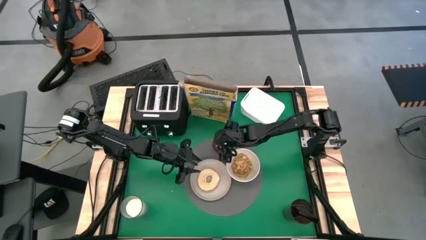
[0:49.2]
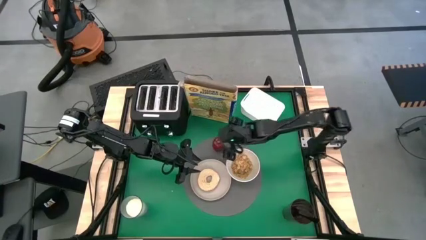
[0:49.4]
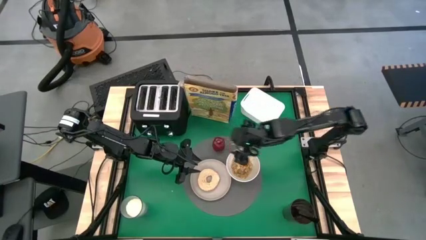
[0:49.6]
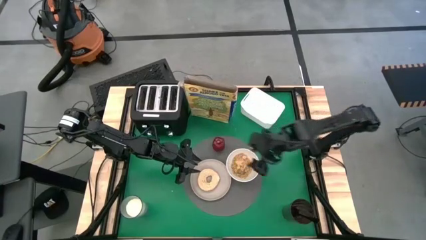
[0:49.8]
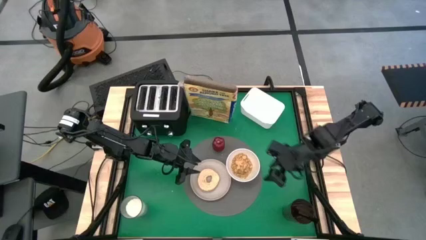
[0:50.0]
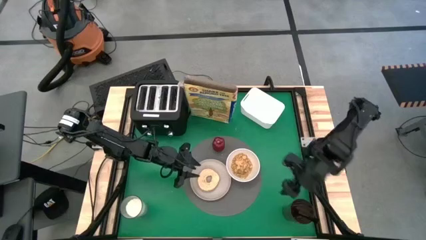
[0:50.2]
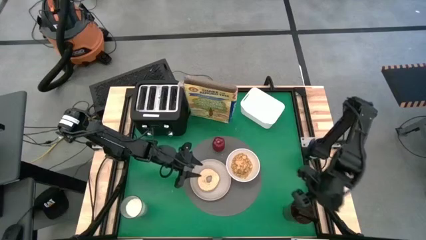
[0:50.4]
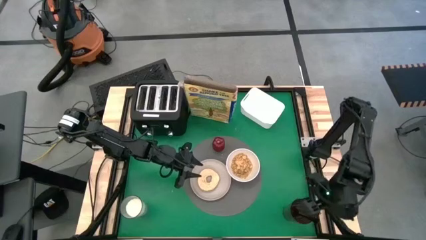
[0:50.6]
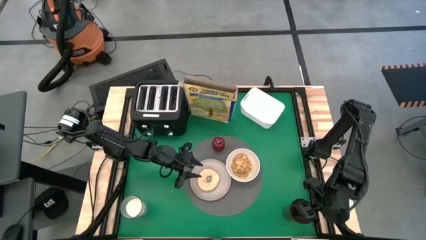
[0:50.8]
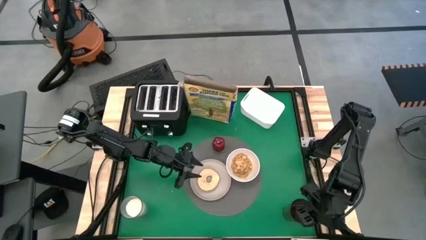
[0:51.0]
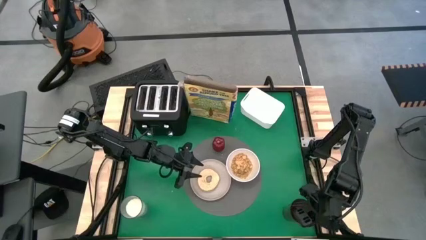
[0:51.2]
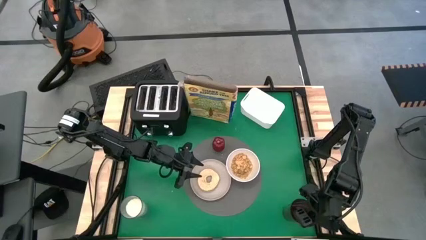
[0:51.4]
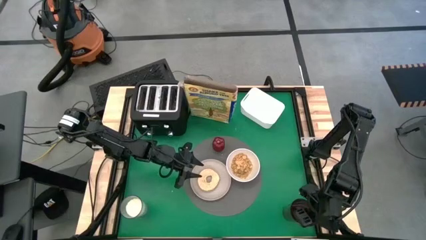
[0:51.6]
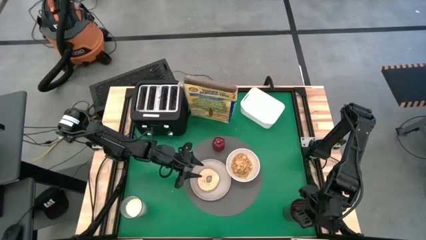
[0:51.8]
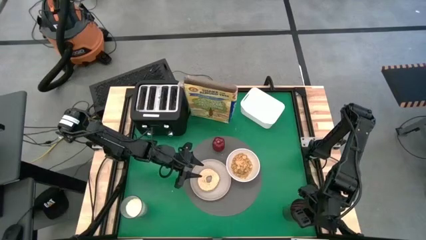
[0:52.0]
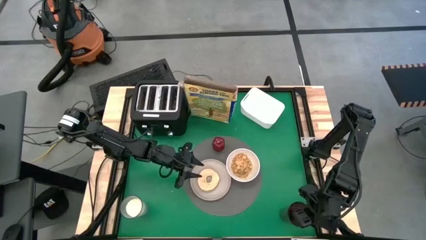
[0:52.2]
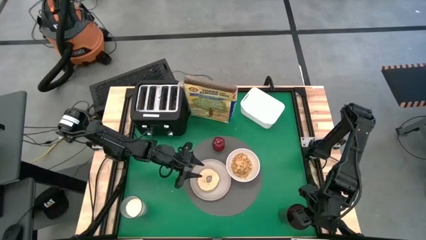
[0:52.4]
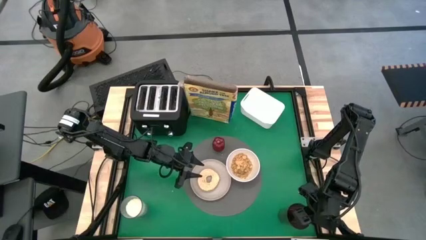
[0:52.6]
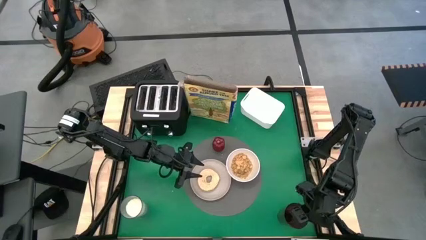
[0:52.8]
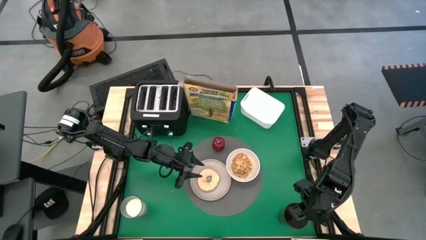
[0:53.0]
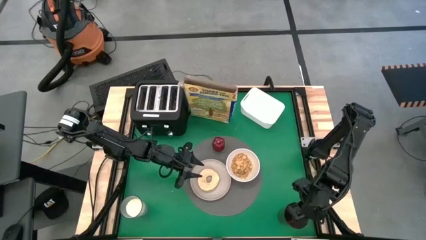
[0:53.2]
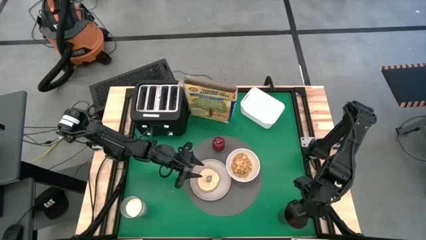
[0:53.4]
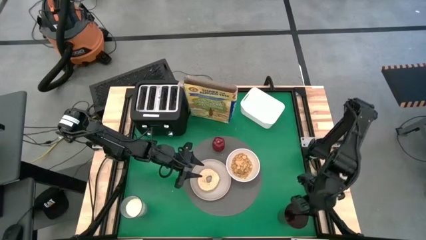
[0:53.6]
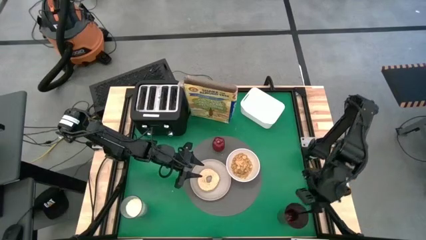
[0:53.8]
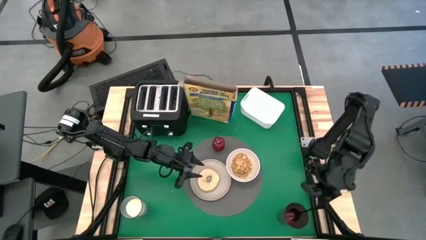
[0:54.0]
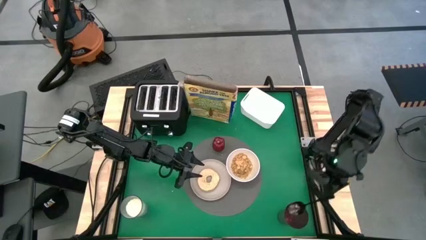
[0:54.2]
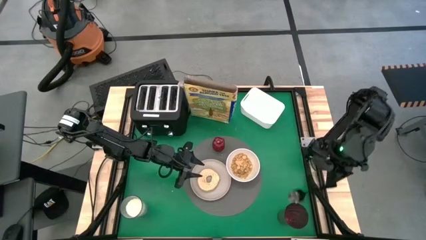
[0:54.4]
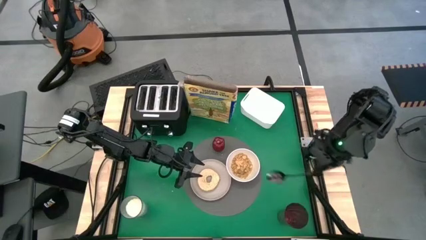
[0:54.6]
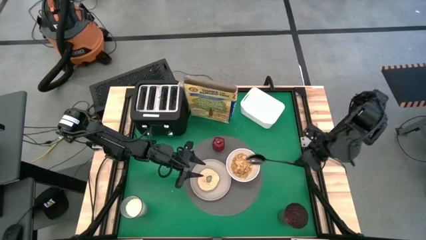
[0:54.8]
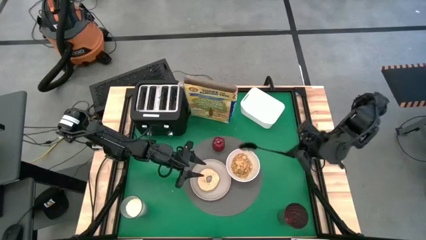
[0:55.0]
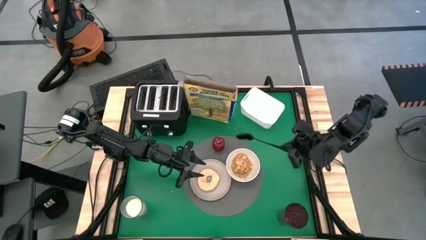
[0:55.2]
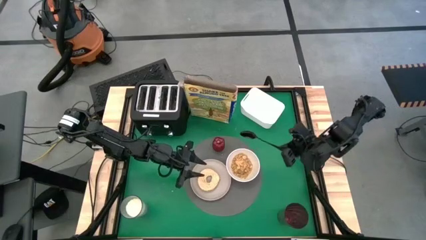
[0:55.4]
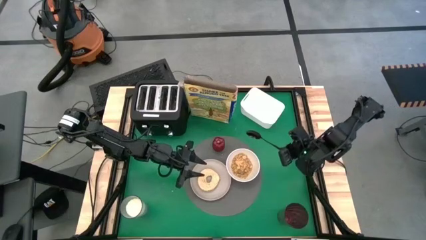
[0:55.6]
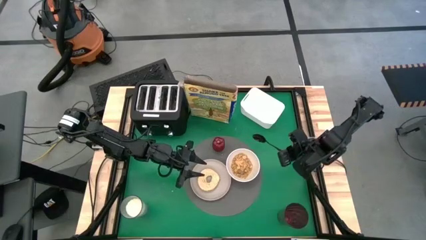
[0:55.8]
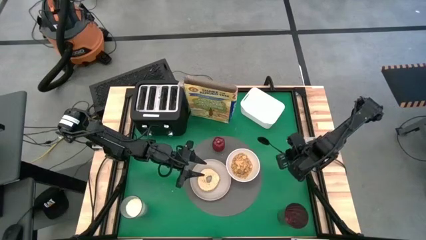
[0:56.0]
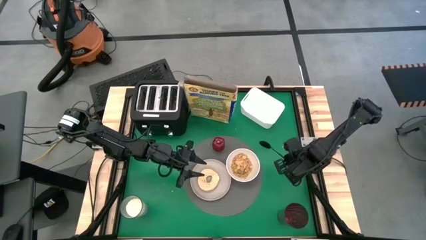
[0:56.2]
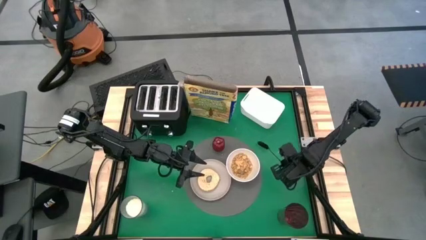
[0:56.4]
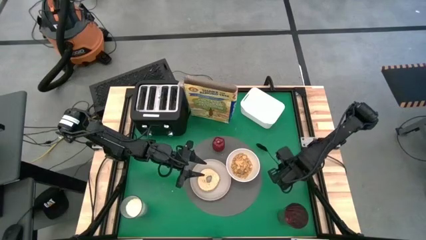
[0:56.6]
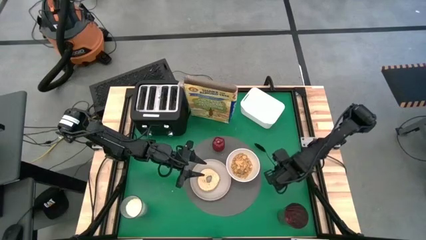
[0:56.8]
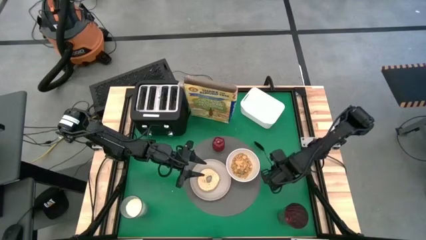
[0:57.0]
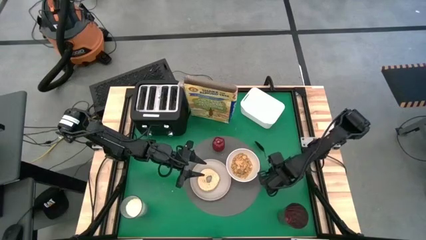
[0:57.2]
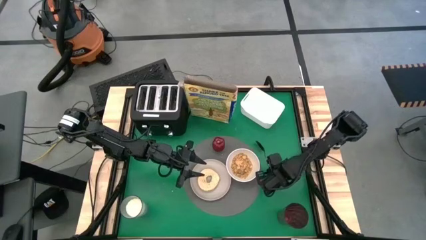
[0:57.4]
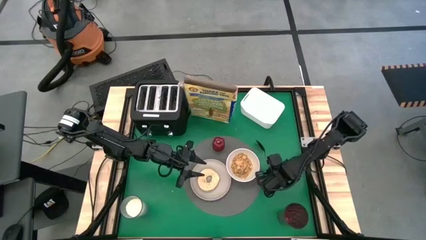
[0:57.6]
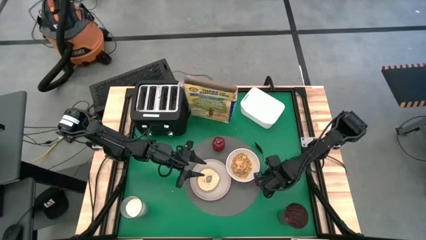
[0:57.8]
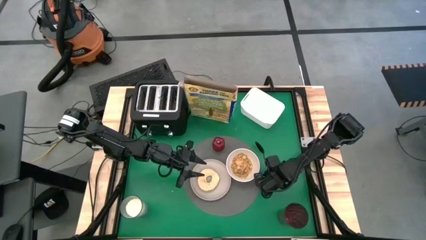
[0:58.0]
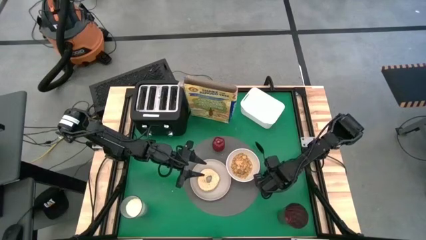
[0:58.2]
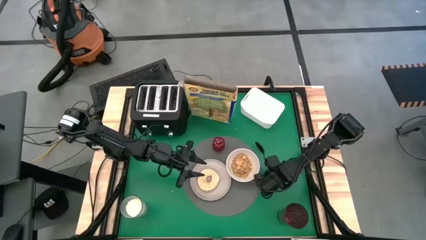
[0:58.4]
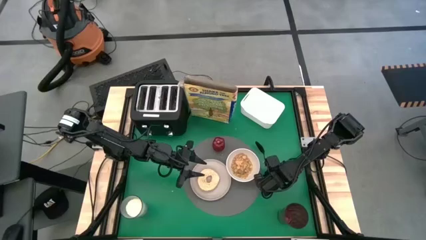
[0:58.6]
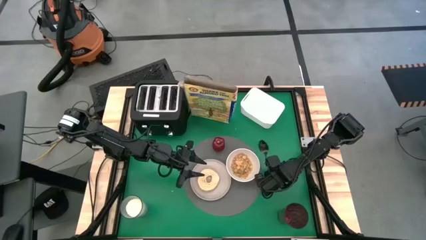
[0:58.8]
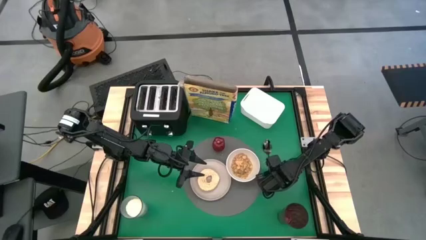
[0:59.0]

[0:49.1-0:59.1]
Task: Arrange a breakfast setting
Put the spoon on the table surface to the right of the white bowl

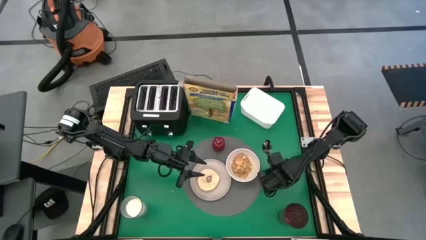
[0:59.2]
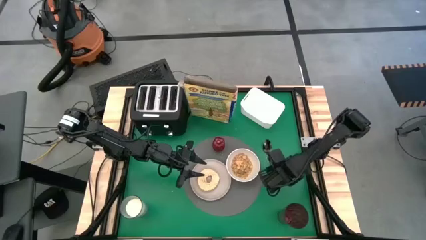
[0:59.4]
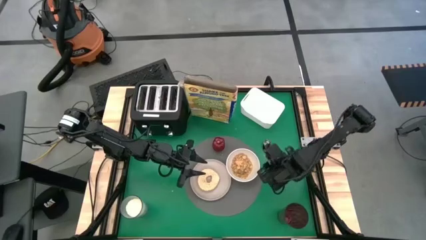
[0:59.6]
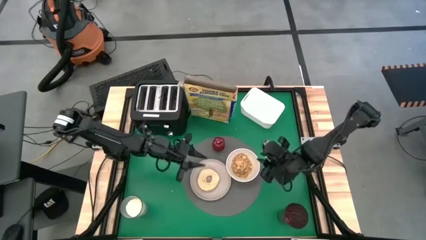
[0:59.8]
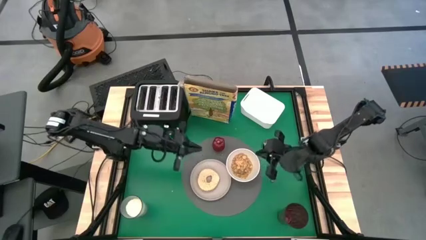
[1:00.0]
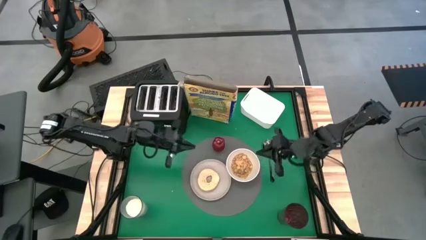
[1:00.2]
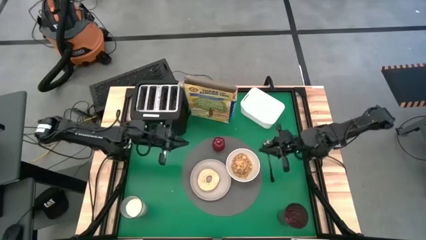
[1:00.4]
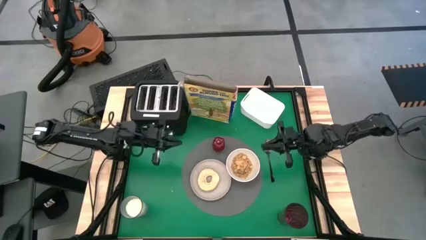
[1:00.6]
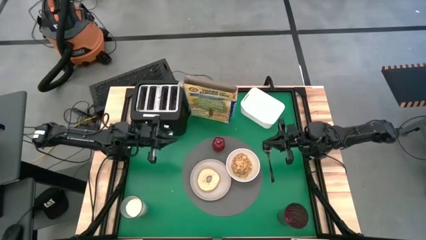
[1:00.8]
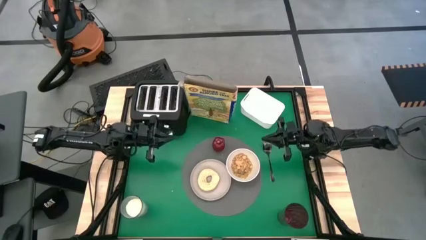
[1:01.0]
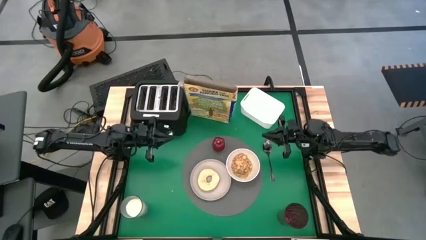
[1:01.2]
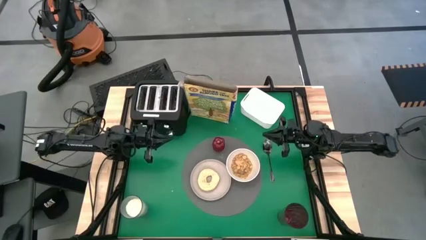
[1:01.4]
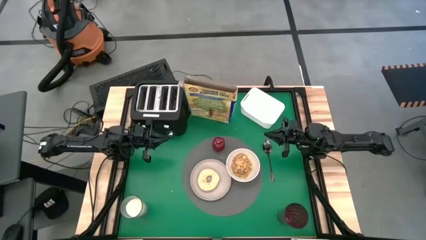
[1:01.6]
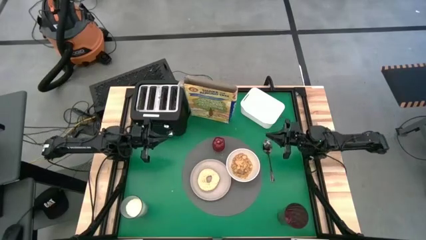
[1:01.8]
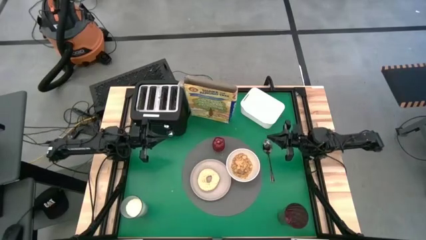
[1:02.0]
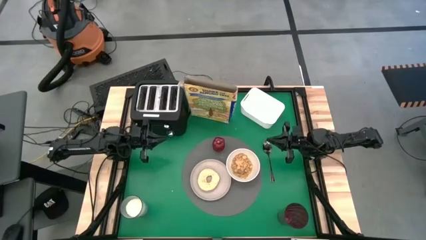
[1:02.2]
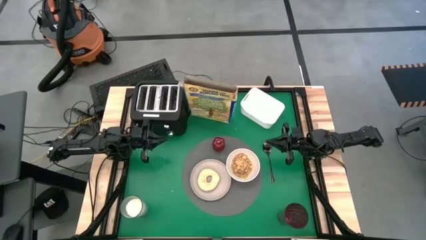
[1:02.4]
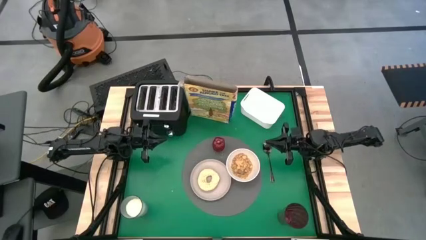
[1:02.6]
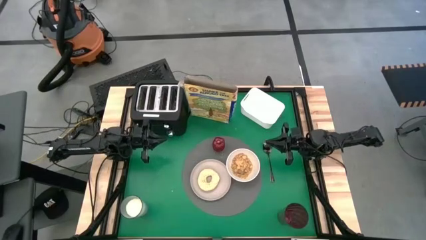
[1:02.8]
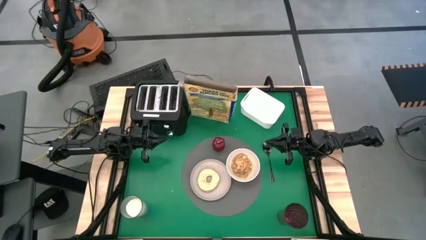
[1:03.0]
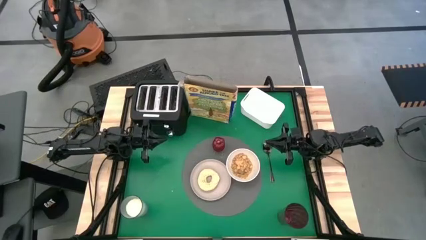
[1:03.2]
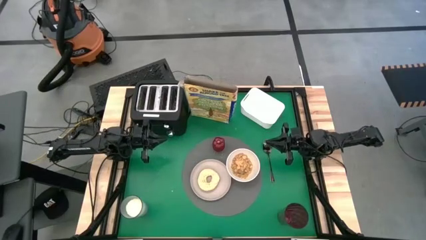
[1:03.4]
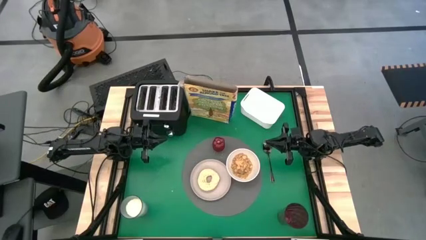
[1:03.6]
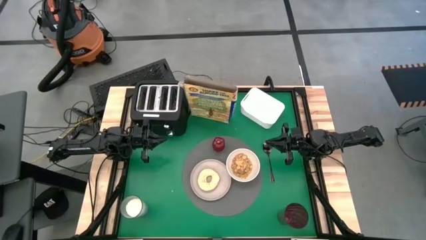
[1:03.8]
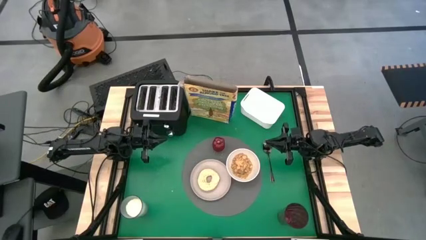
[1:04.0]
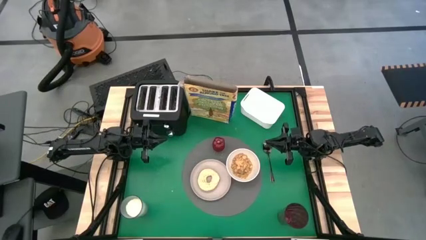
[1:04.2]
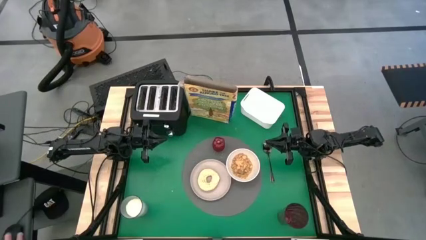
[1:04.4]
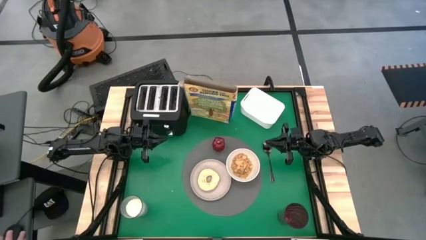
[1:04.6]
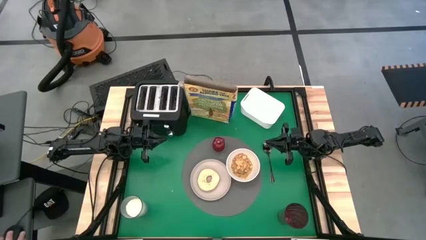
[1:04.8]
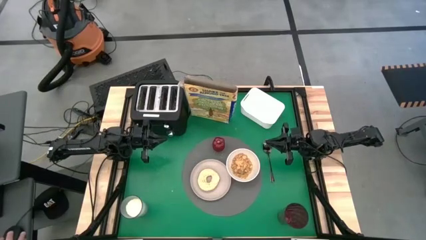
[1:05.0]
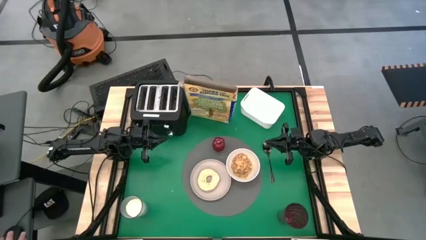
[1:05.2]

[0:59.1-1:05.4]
Return to Home Position
